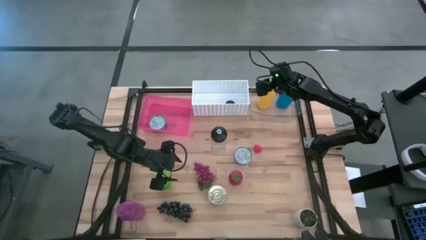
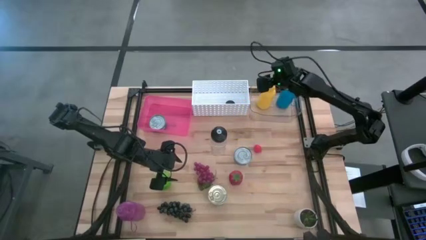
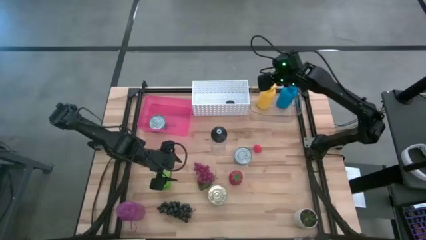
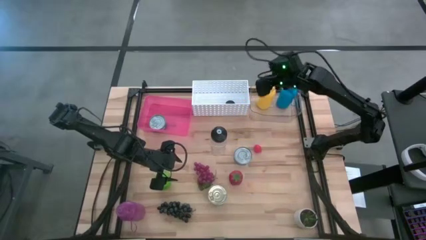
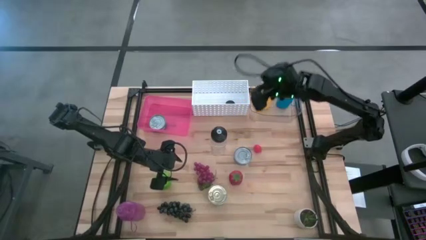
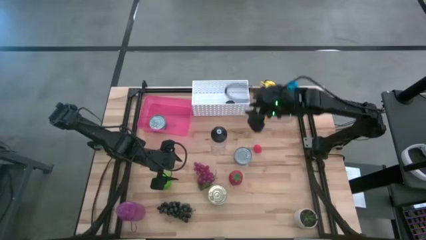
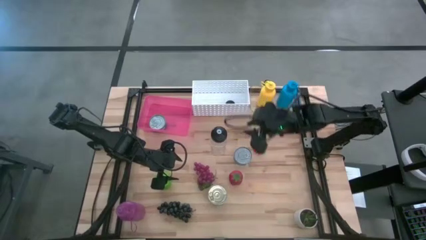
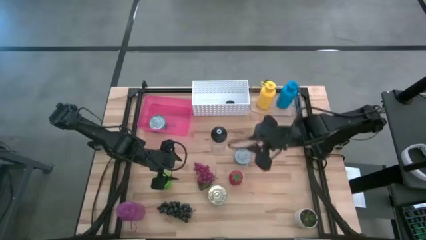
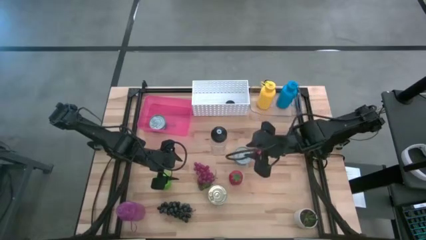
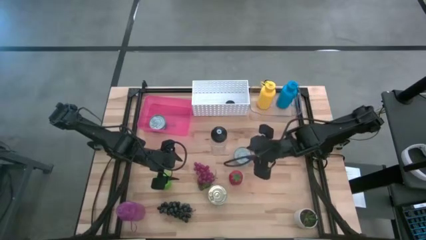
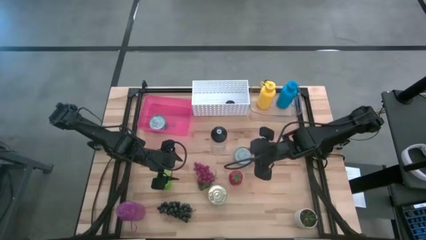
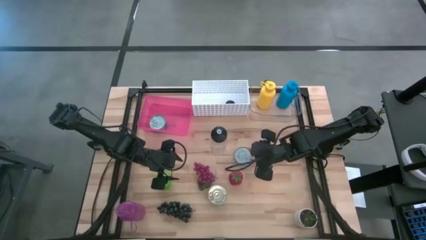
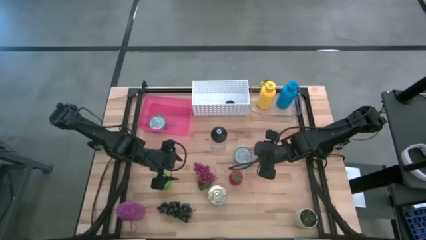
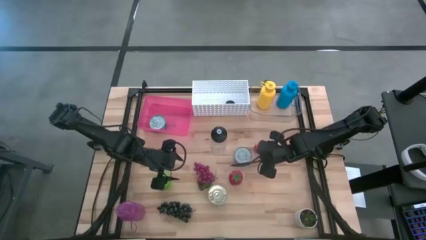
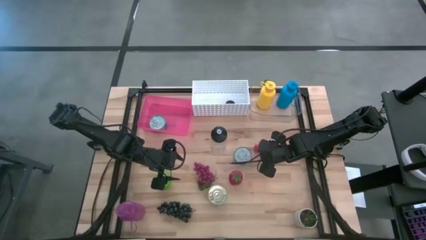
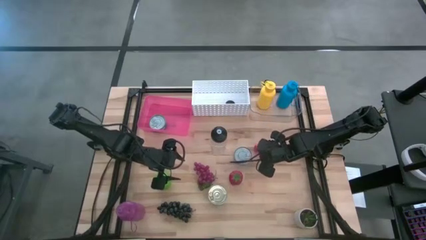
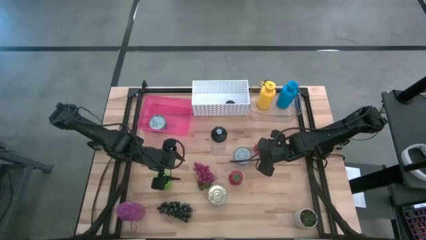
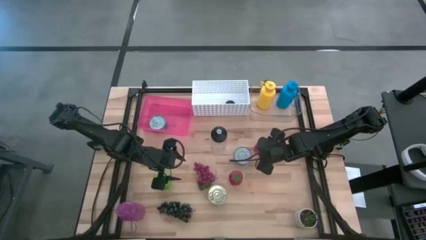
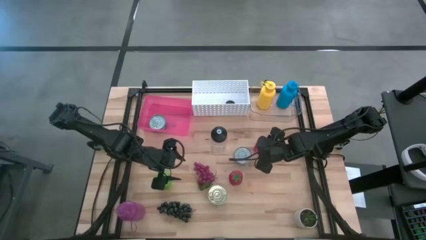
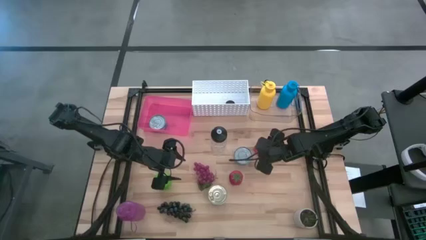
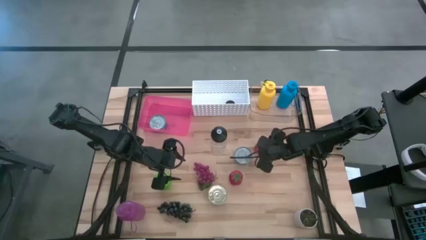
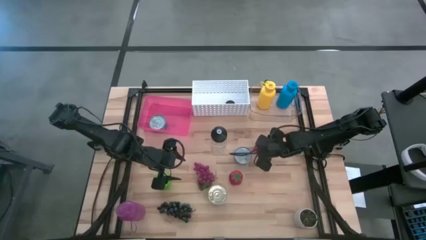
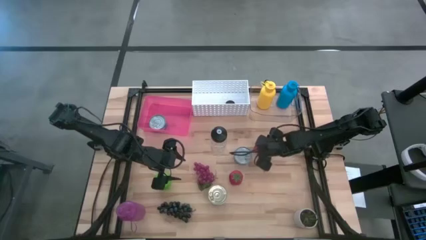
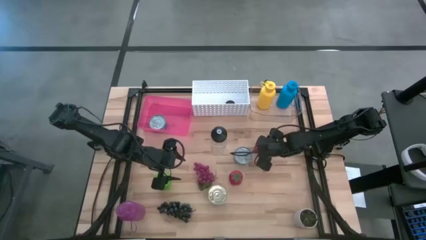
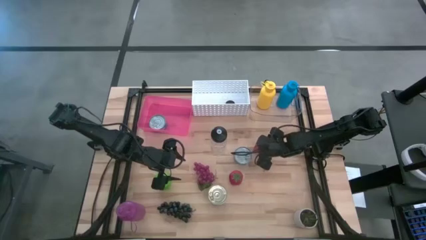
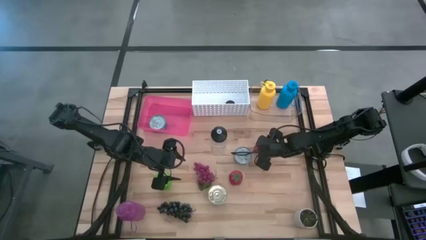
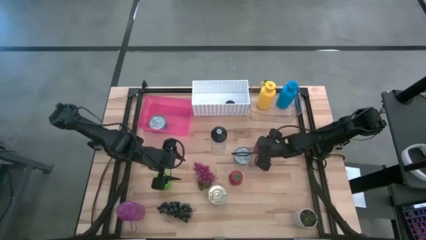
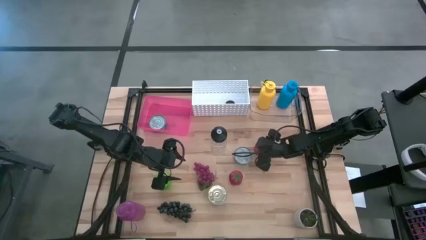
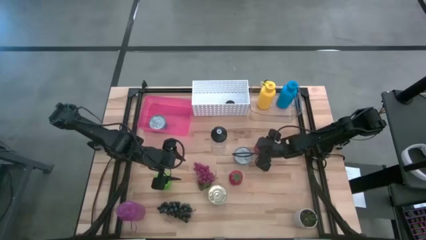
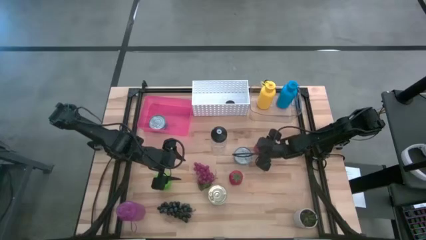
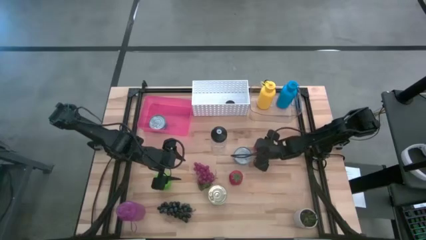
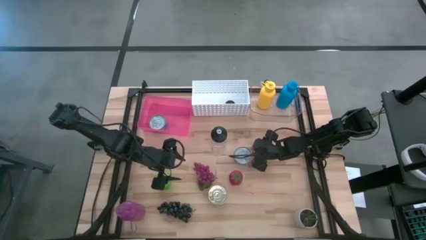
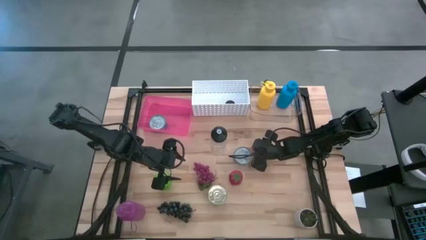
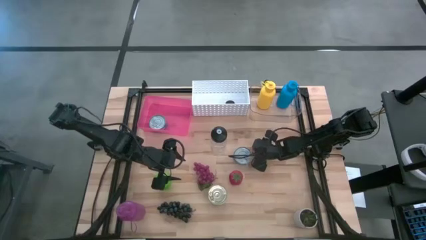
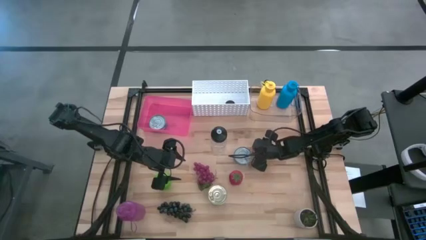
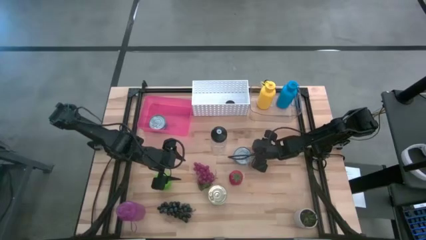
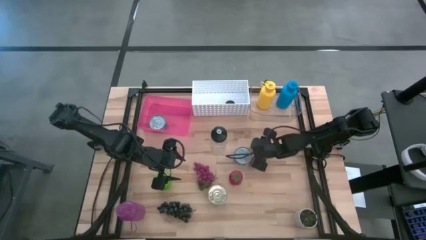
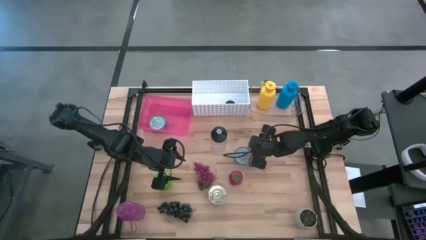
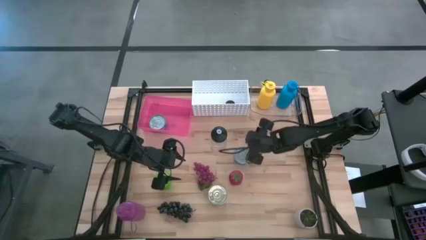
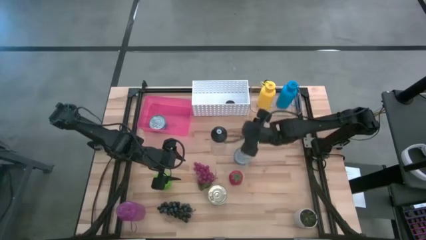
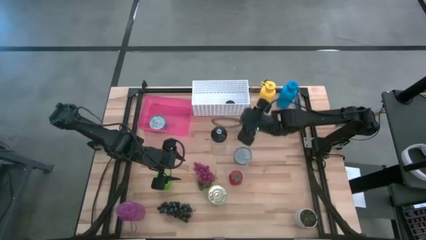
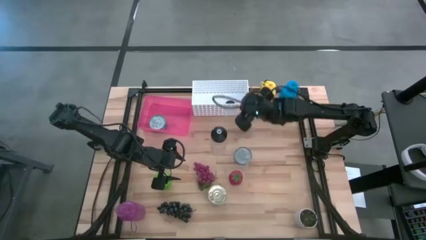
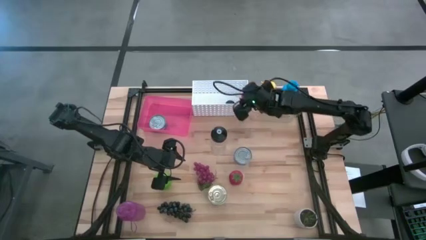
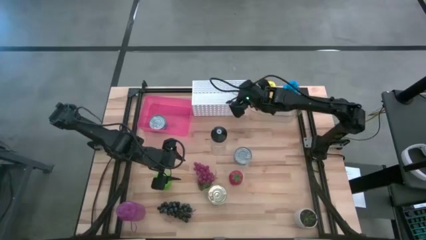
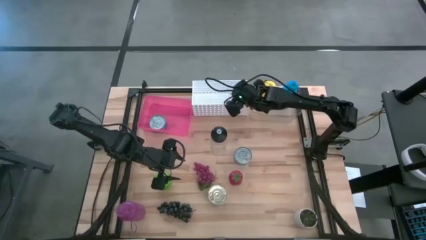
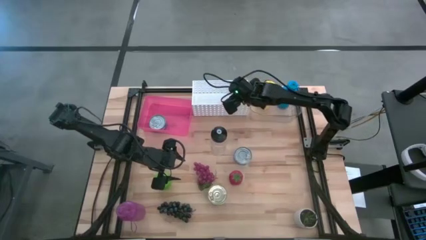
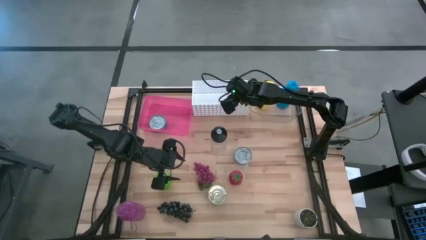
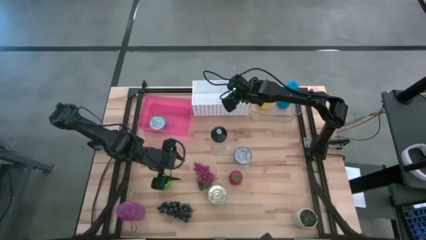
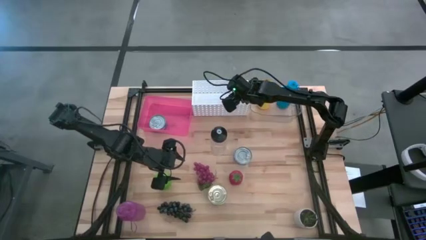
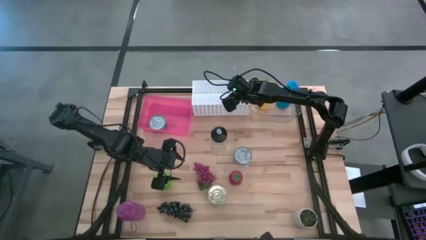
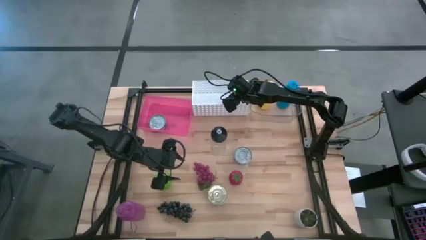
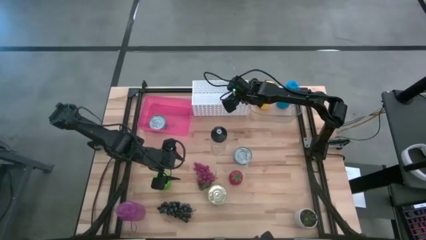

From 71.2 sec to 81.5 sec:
Task: Pick & Place Food Item
Put the red strawberry into the white bin
